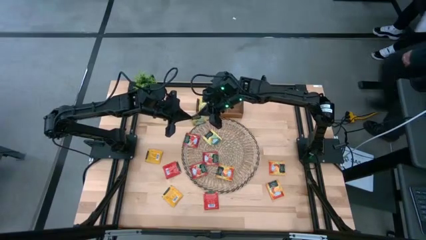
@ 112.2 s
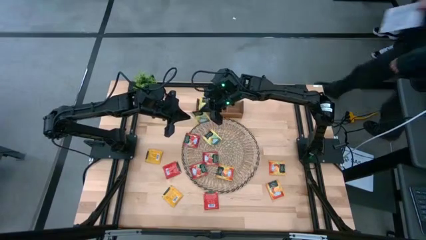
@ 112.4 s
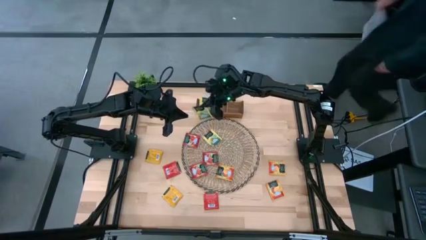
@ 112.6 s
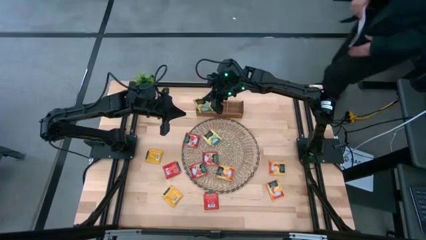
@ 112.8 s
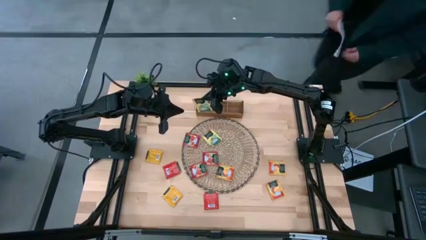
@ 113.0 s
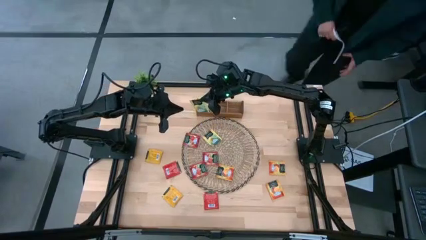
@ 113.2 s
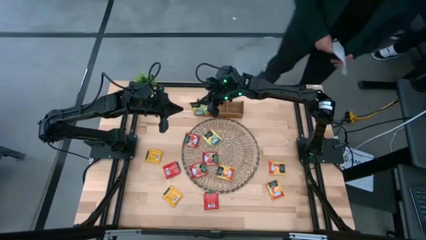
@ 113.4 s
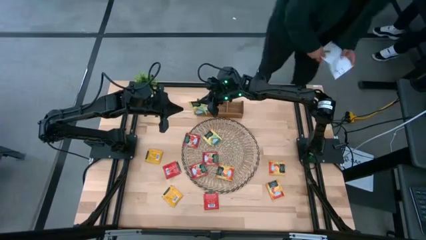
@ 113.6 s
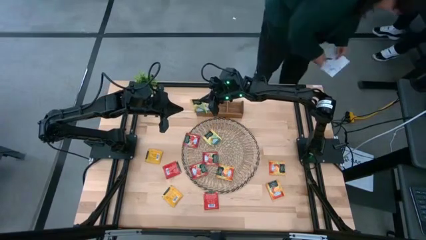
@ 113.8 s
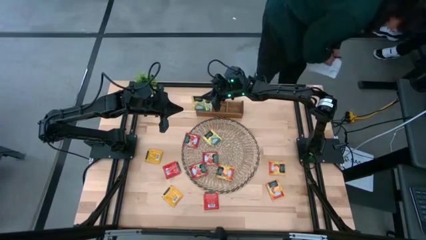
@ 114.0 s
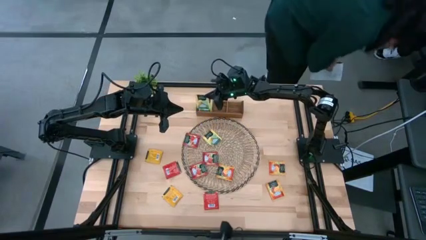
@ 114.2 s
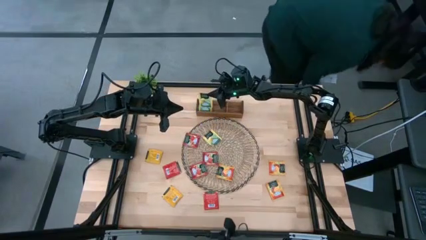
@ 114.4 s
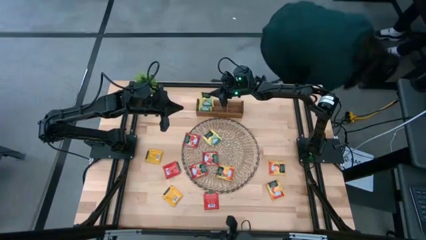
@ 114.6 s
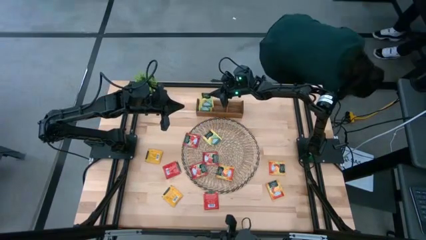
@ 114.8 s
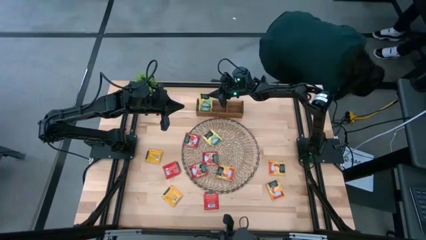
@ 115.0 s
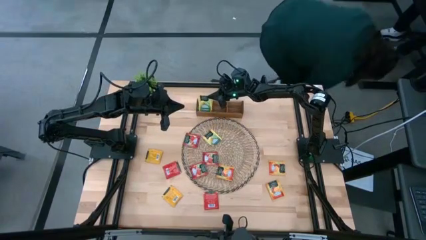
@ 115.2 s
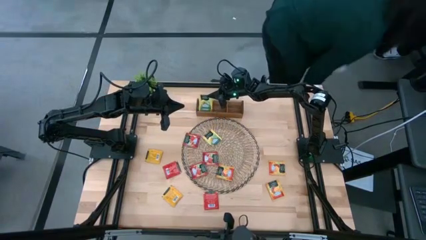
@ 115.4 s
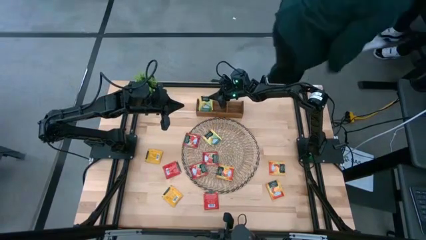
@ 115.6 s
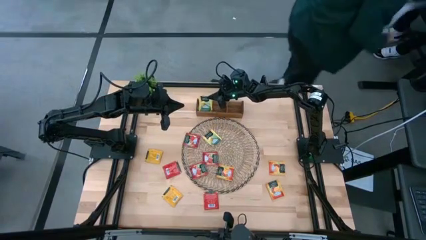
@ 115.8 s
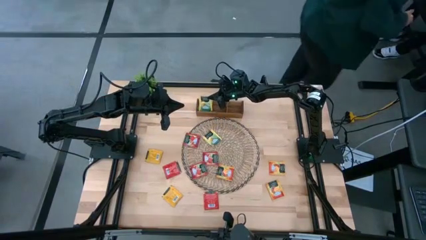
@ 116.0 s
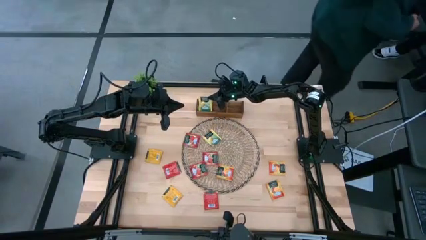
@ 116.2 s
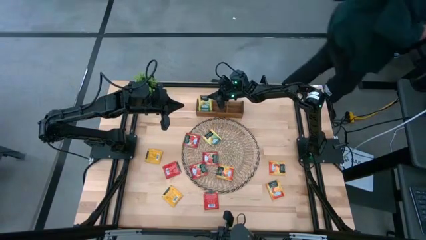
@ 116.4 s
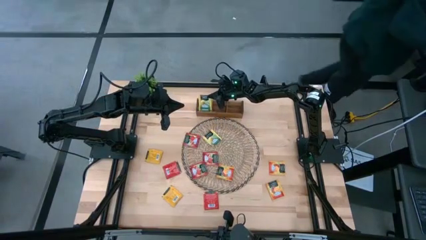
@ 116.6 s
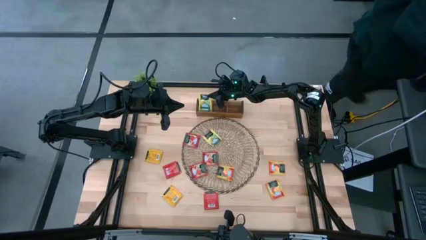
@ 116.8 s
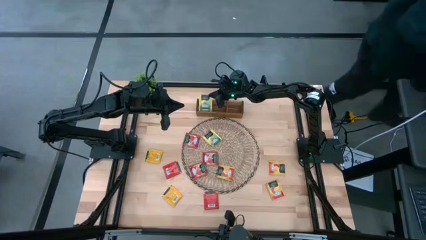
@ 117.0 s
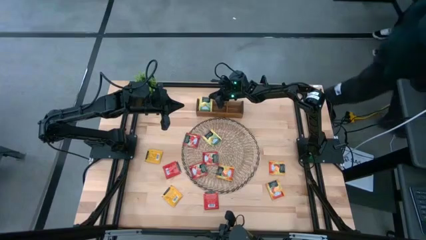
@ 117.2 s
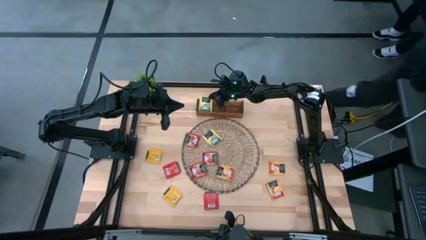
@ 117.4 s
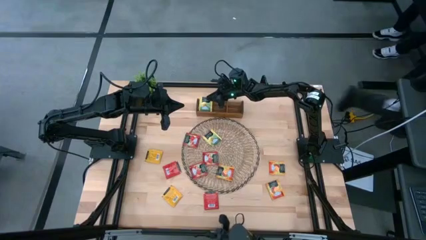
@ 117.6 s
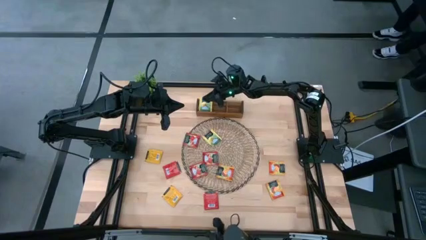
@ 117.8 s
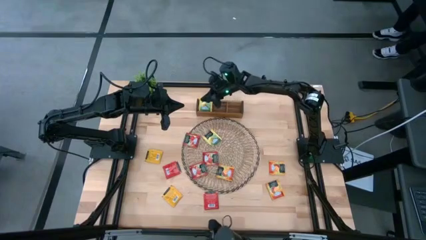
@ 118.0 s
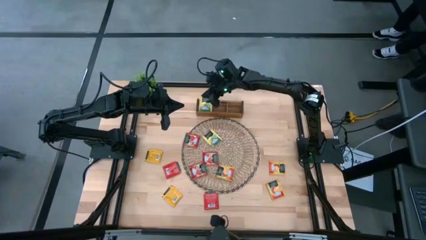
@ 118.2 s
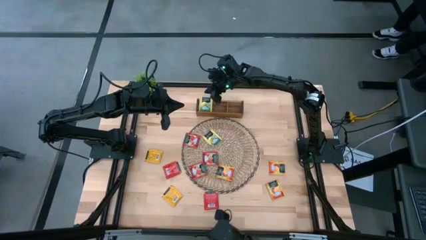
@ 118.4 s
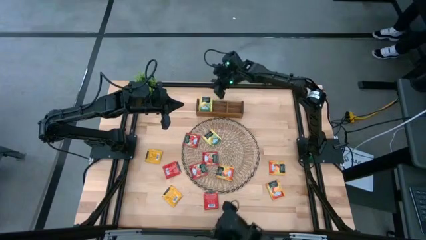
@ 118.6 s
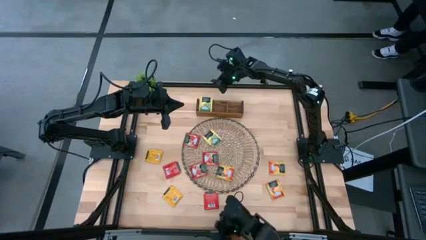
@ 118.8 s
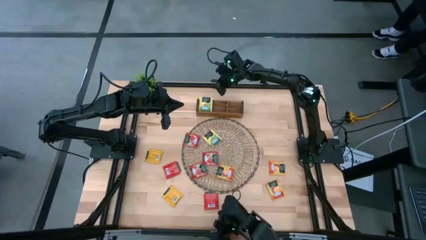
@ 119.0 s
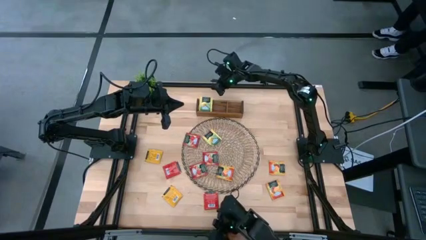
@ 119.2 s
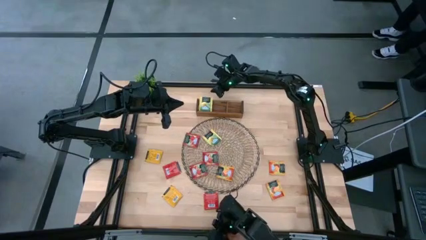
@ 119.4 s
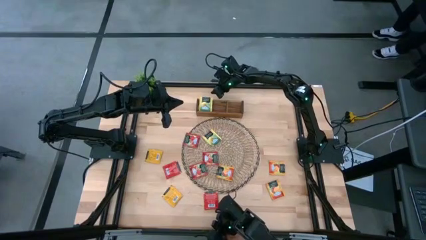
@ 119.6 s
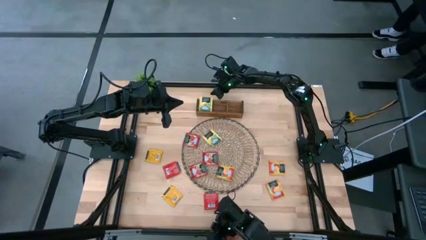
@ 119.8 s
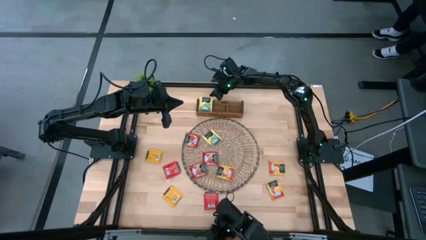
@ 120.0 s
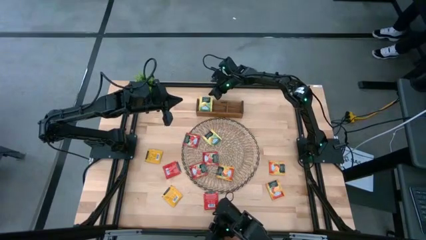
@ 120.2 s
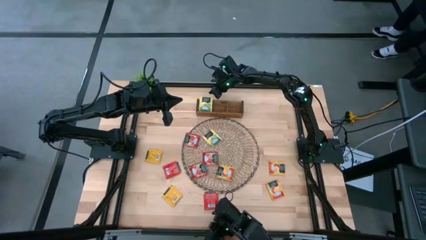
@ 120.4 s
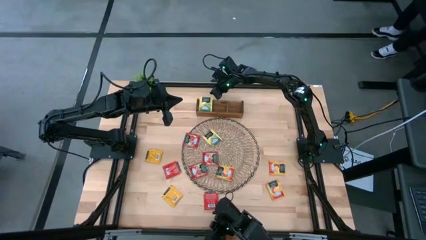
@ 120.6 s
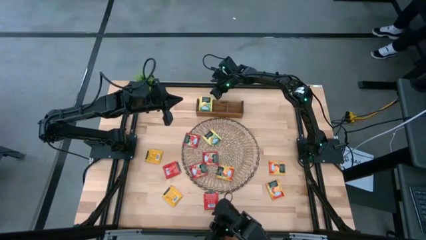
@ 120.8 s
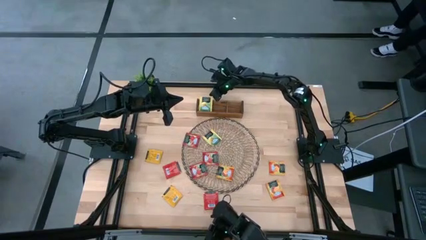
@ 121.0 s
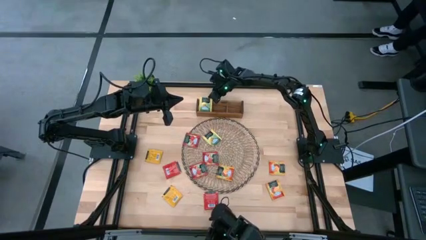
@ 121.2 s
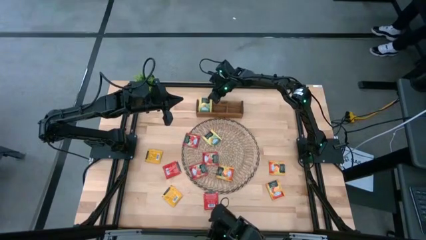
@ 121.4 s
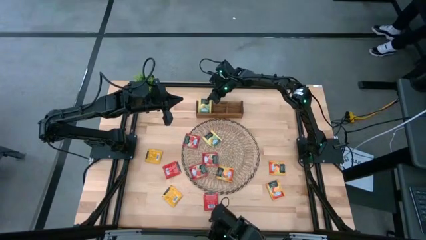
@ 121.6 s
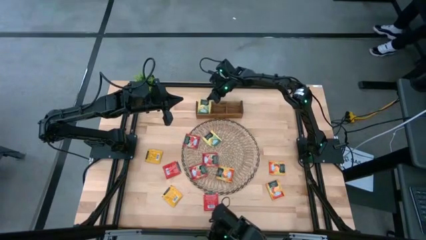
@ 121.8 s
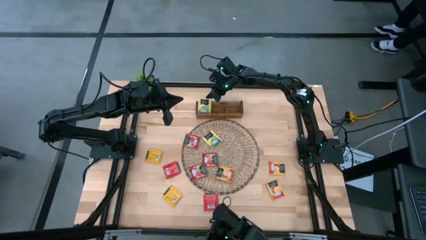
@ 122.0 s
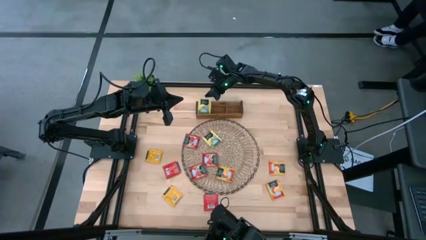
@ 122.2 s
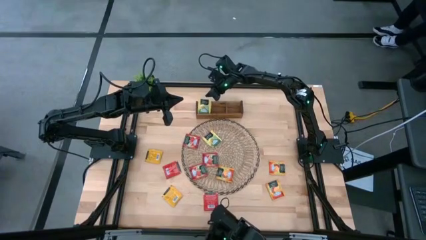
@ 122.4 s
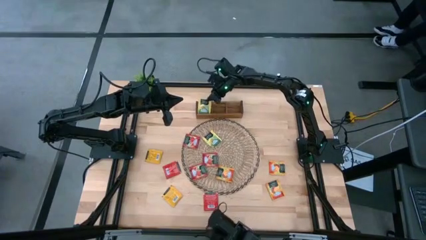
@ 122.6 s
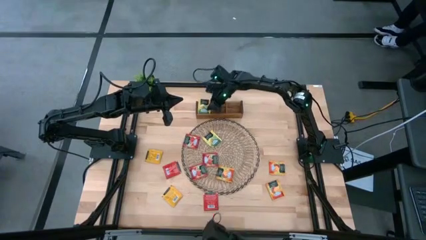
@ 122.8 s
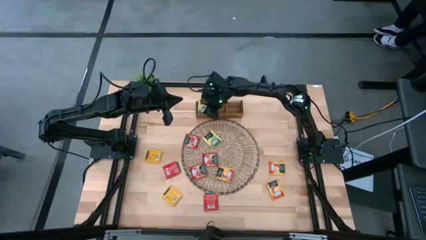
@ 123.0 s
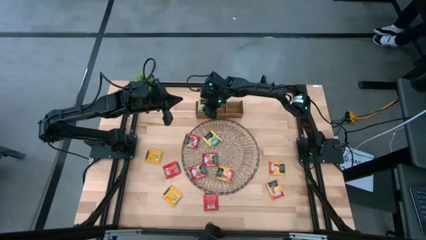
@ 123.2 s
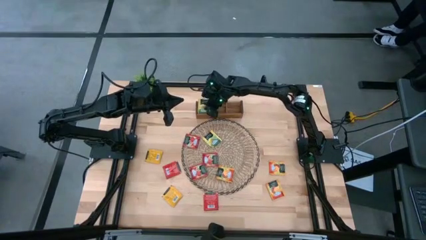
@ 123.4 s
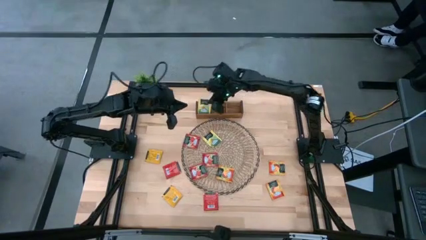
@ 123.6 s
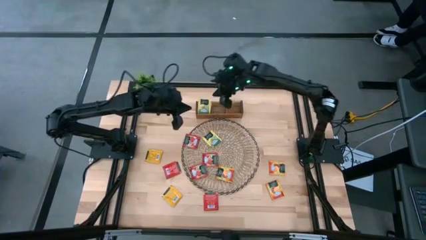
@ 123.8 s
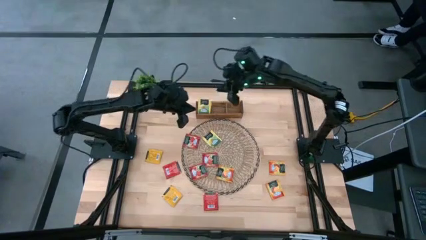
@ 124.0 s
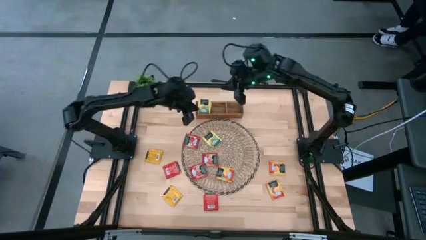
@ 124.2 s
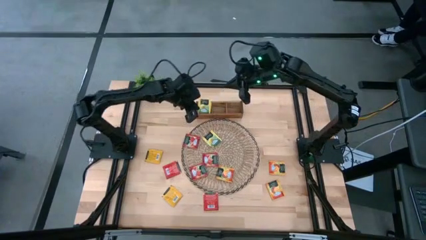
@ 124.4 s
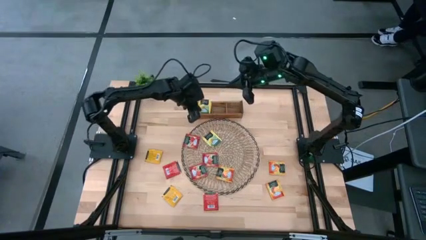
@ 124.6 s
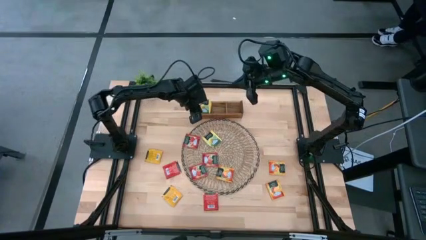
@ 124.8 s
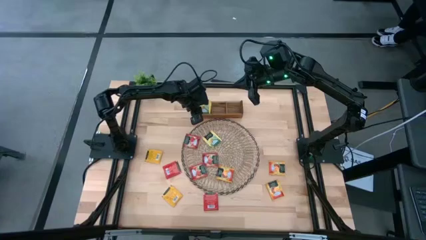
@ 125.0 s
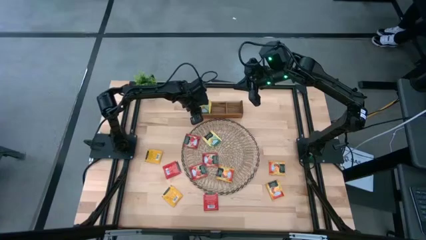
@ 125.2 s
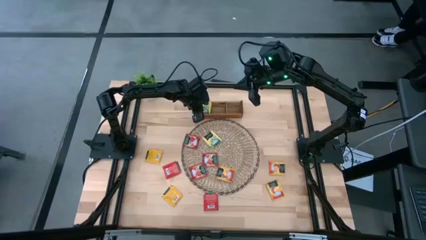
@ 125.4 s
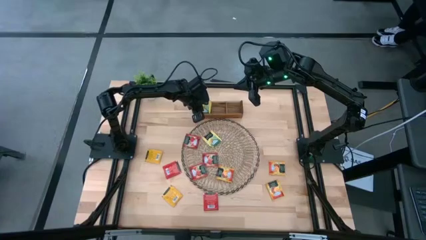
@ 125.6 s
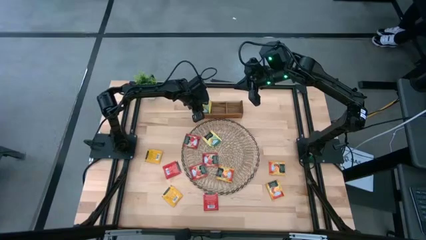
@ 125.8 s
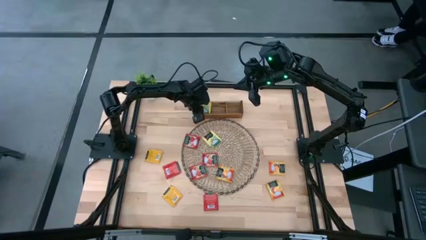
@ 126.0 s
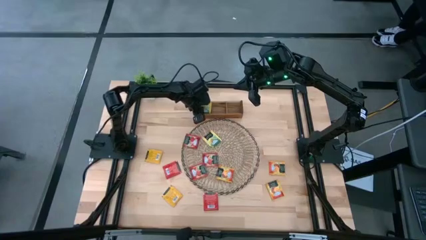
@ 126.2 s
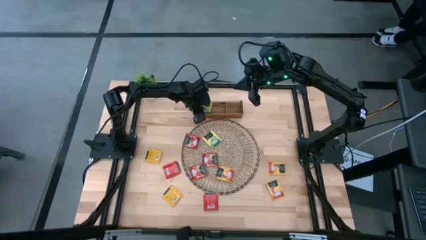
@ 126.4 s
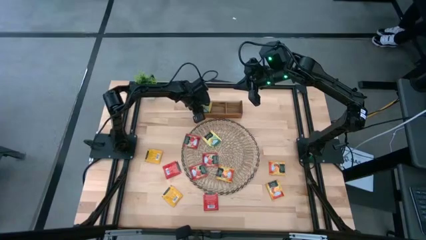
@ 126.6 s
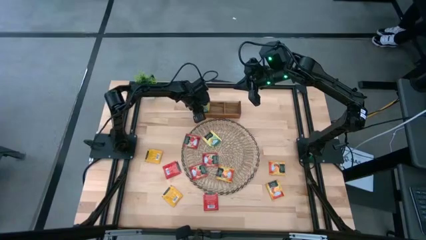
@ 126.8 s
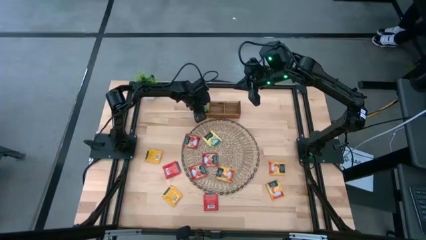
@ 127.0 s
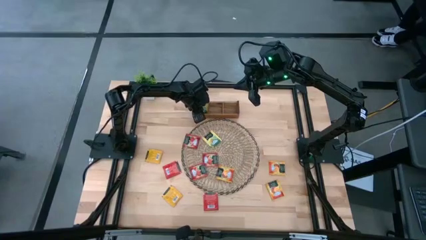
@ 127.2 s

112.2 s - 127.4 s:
Task: Pick & Place Tea
Put the bottom yellow tea bag into the left of the wooden organizer
